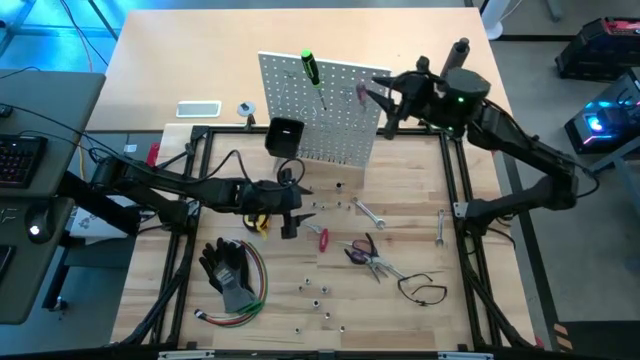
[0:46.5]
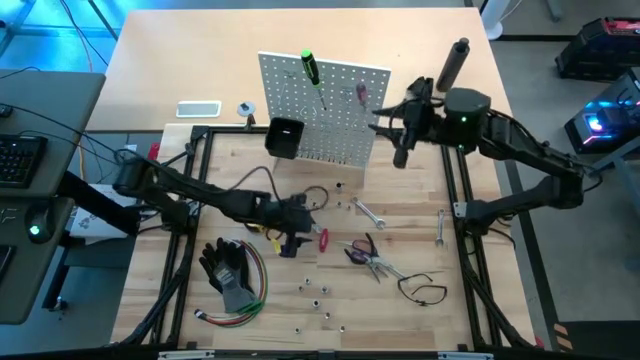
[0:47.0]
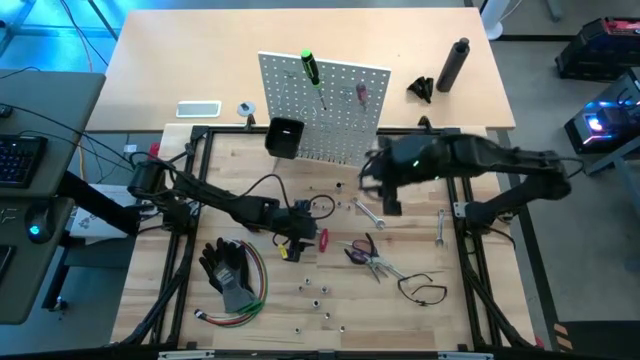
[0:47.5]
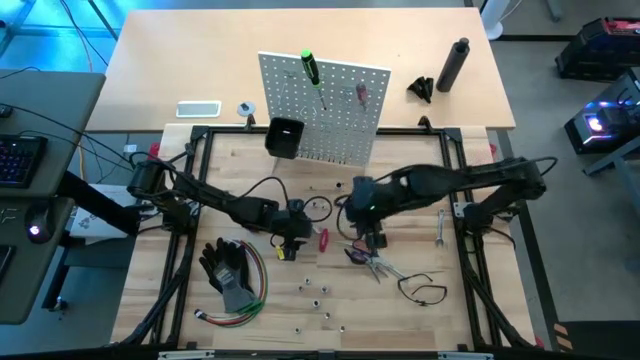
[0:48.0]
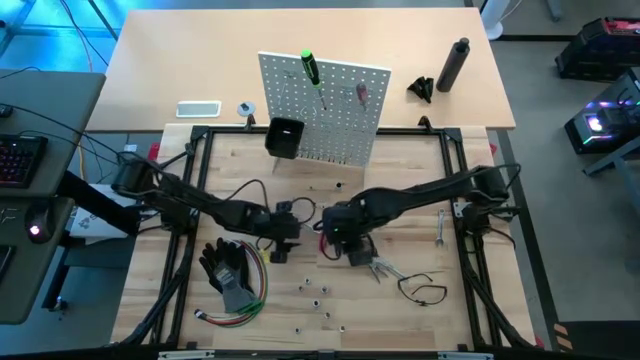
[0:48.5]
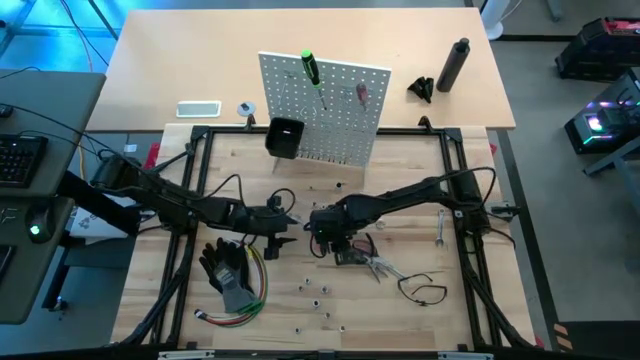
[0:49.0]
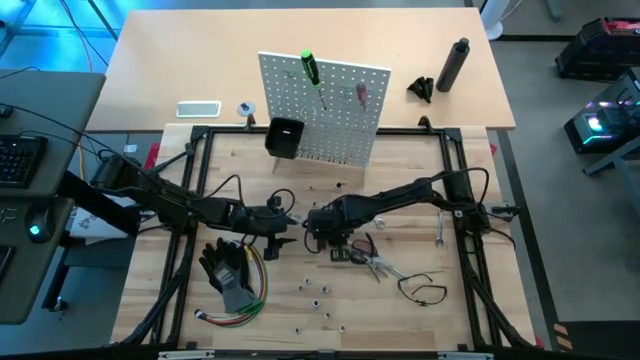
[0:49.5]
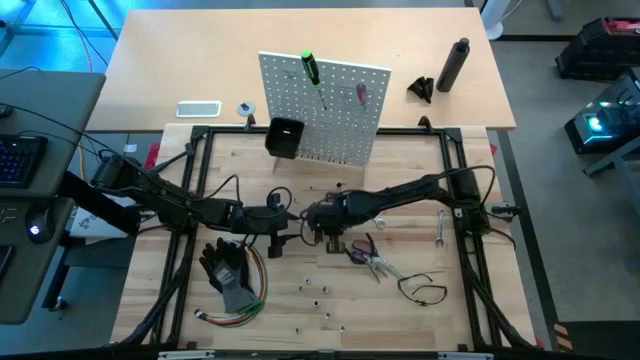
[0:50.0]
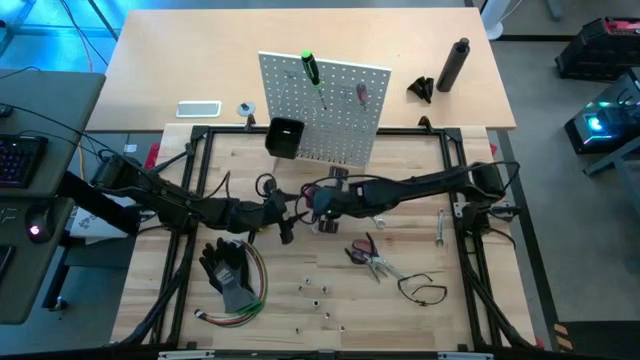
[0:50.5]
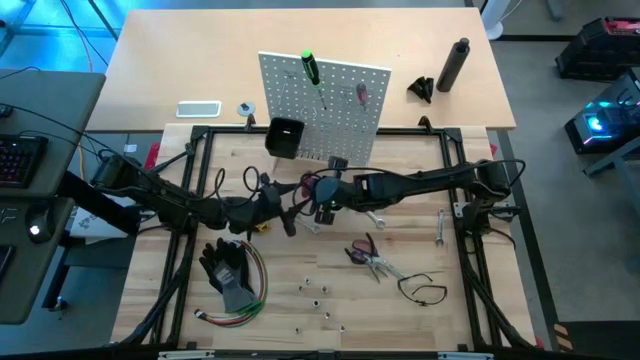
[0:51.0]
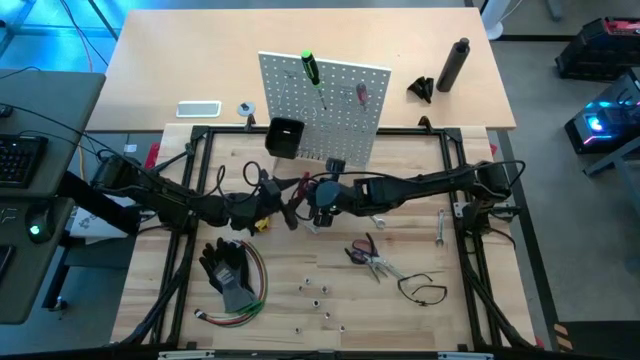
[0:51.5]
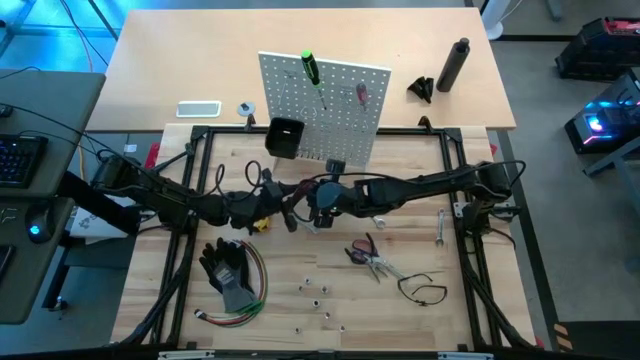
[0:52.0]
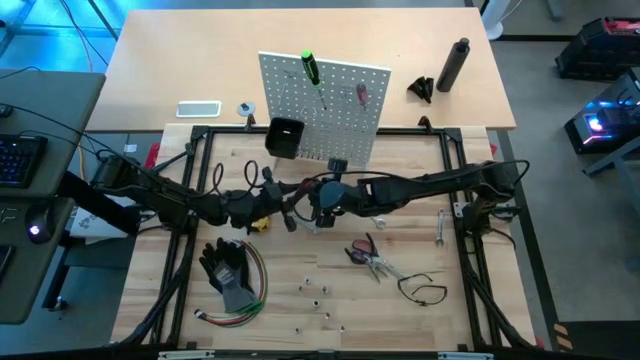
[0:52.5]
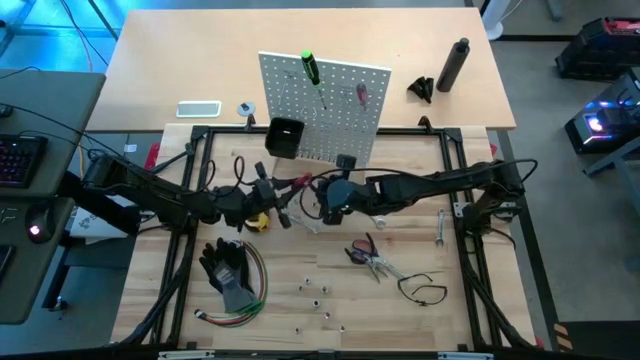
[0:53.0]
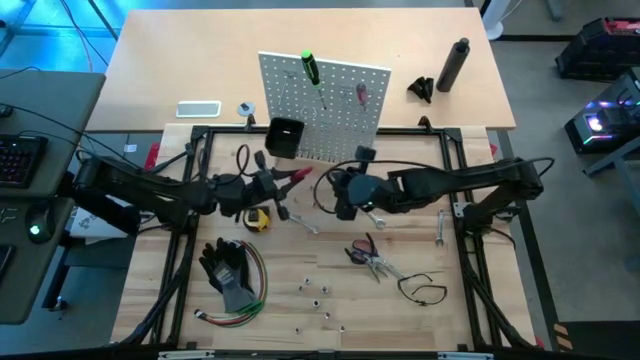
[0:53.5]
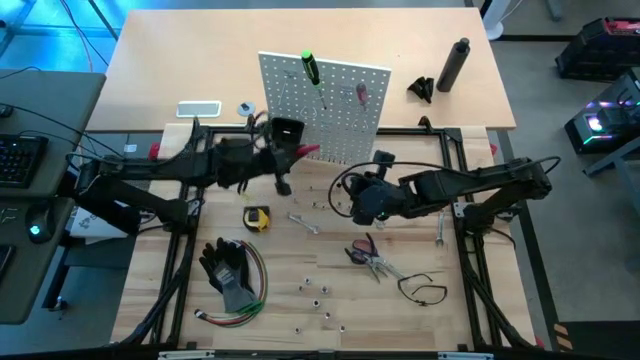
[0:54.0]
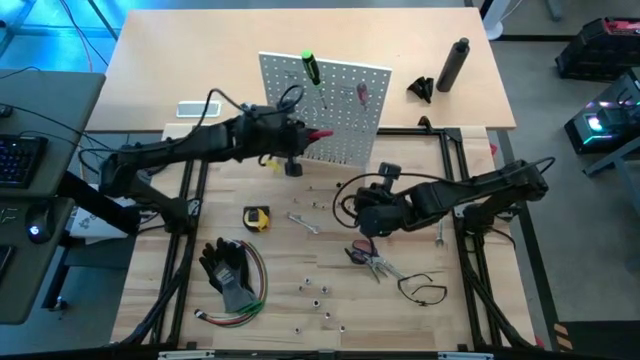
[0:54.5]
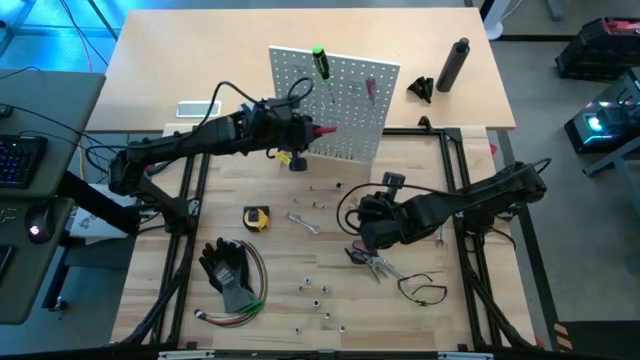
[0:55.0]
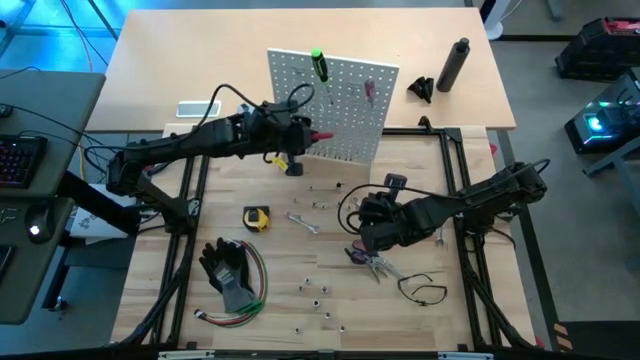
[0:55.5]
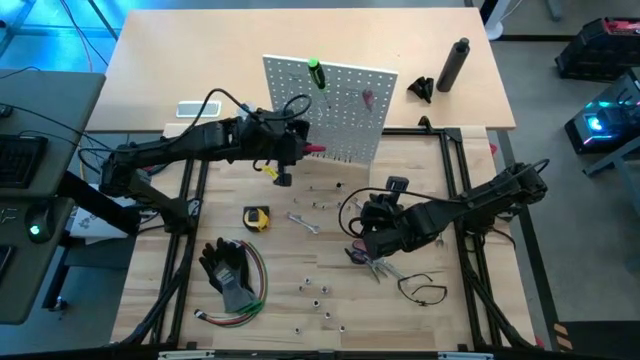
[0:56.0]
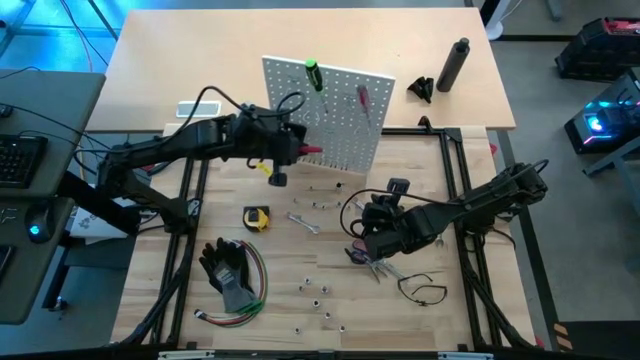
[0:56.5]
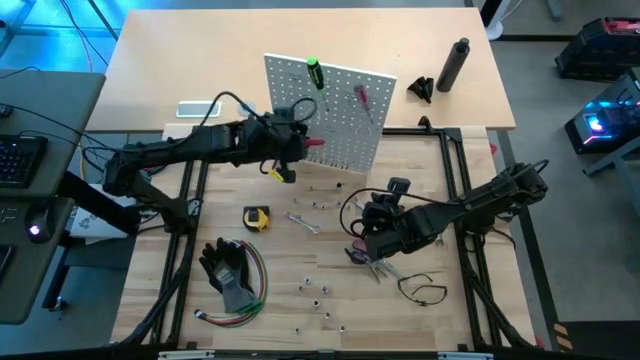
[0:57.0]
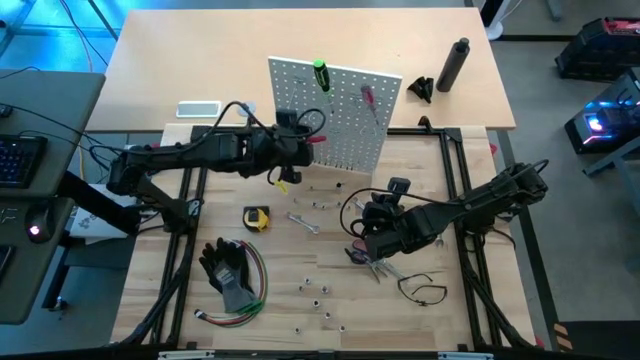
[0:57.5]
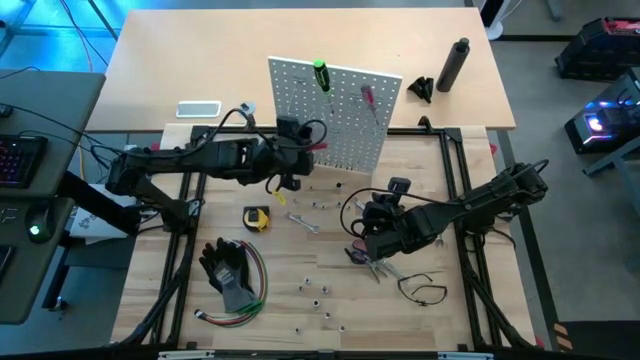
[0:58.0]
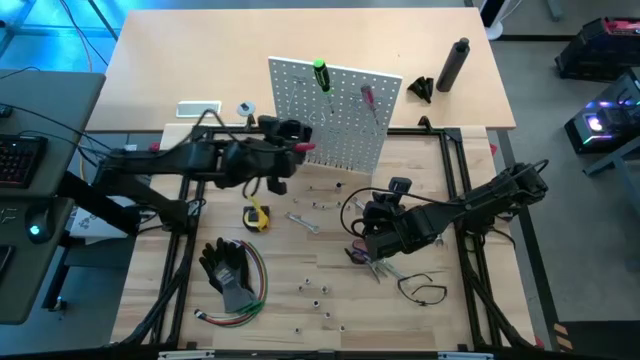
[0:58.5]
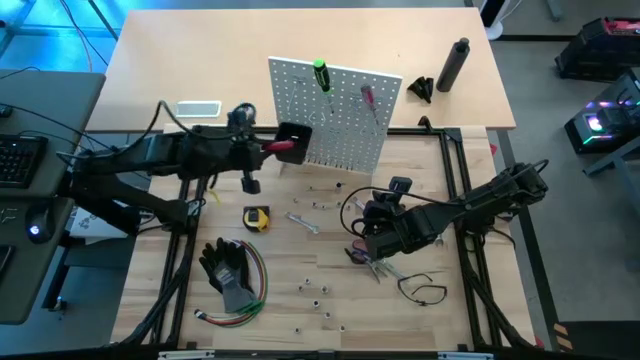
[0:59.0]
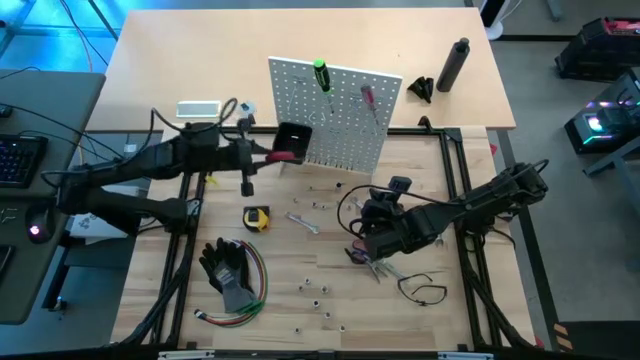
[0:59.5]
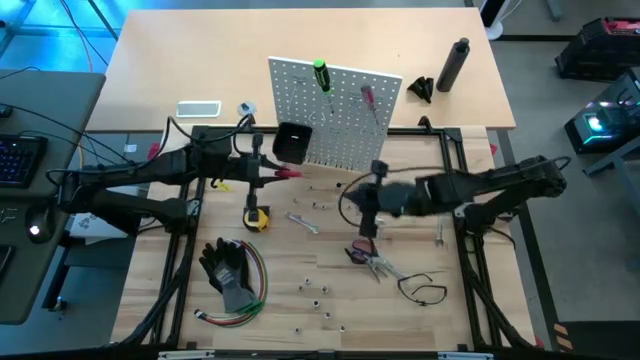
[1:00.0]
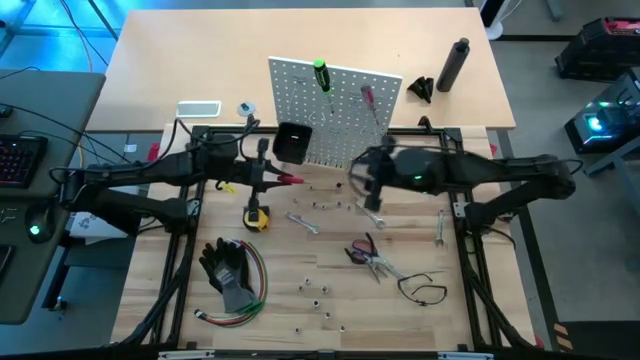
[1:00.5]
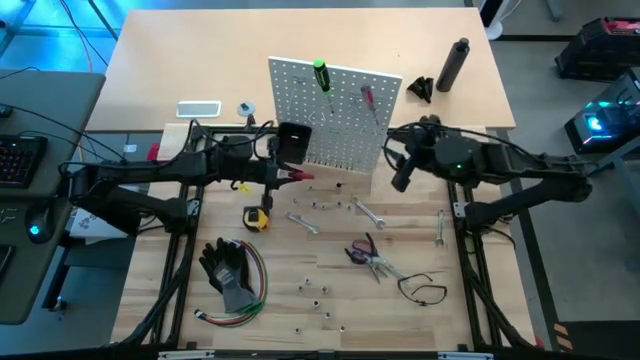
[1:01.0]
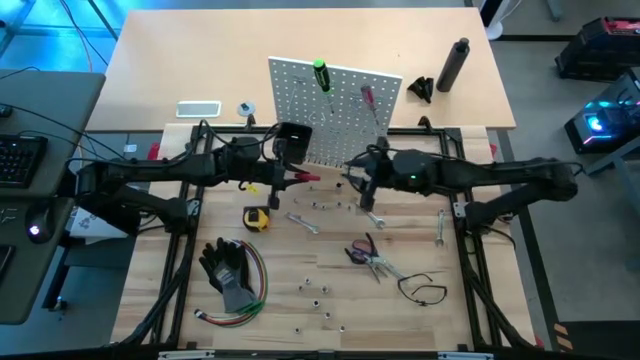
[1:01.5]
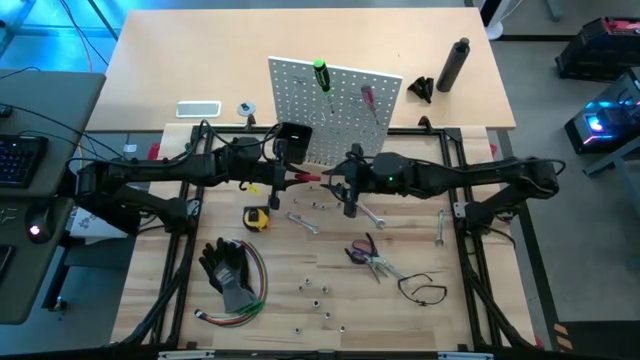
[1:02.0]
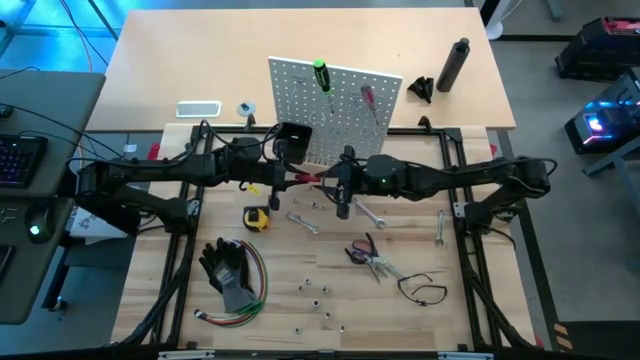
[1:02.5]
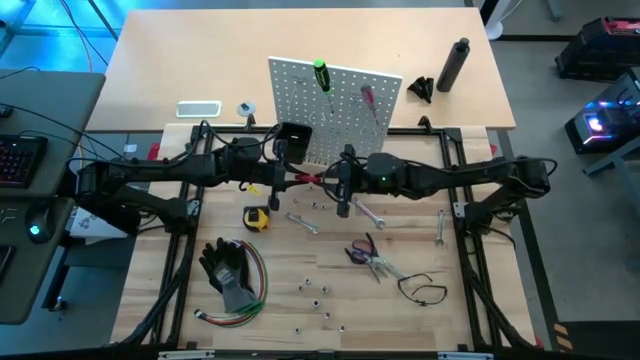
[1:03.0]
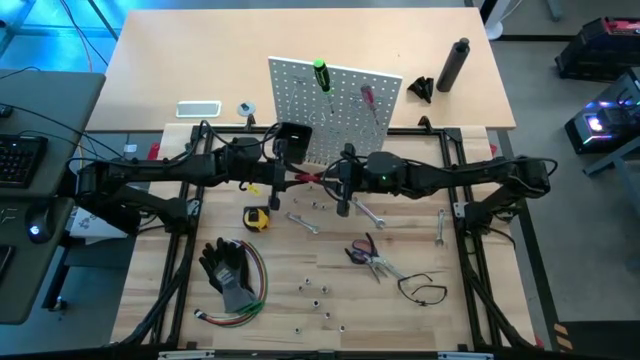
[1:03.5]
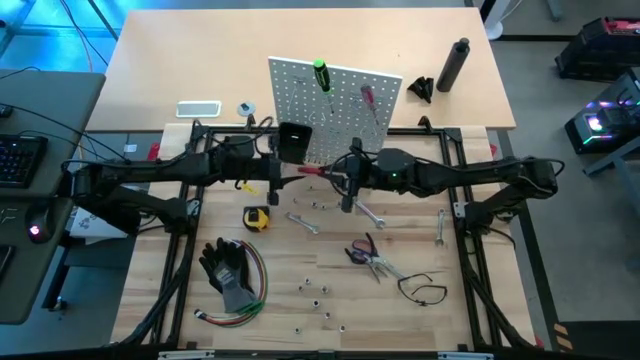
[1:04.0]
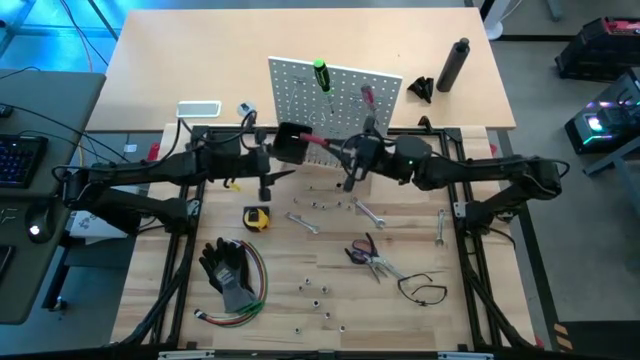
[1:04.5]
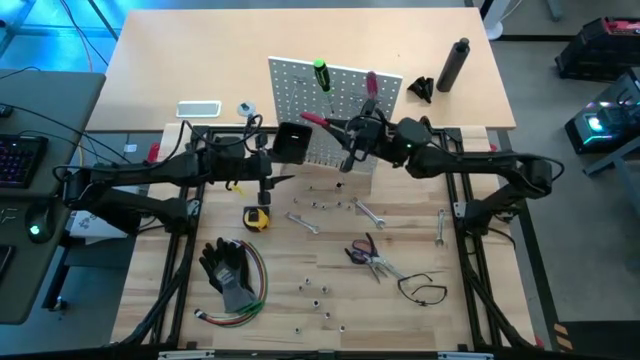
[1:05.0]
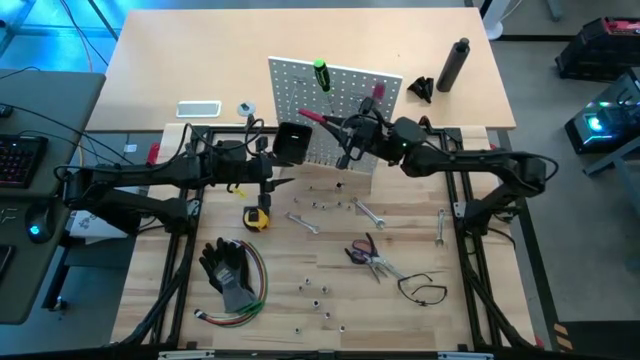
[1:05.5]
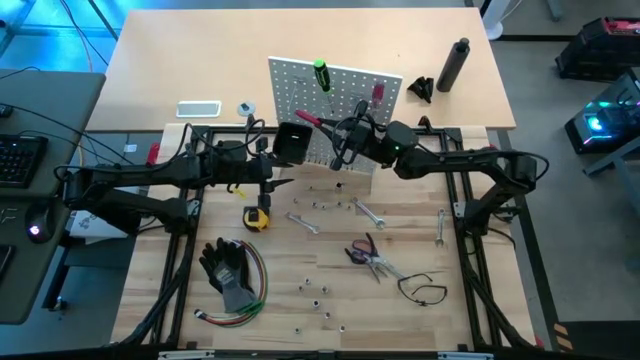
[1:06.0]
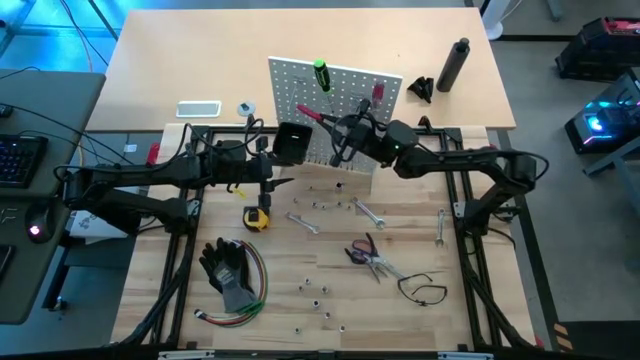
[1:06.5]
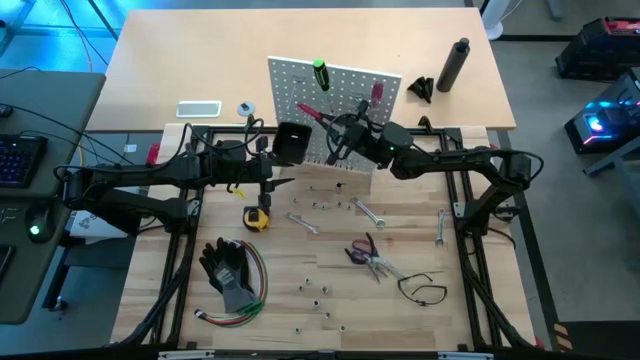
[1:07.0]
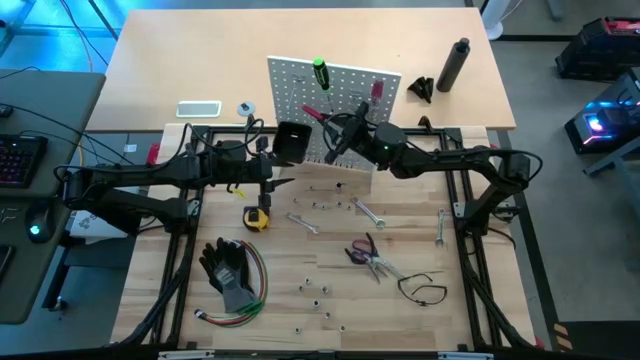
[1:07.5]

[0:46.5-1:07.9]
Task: Hang tools onto peg board
Hang the red allen wrench on the white peg board
